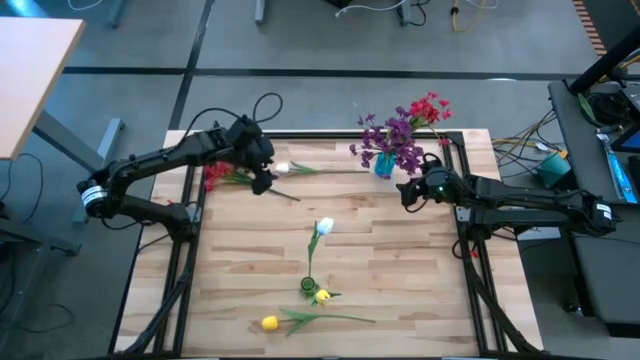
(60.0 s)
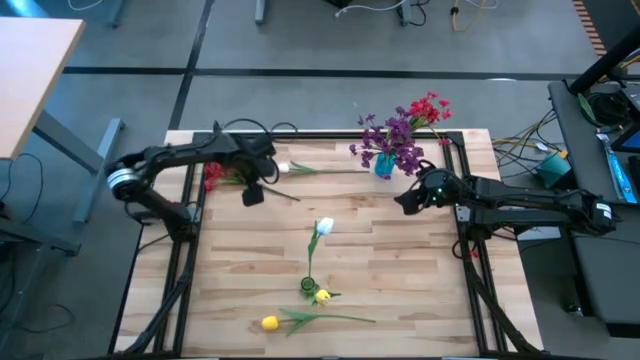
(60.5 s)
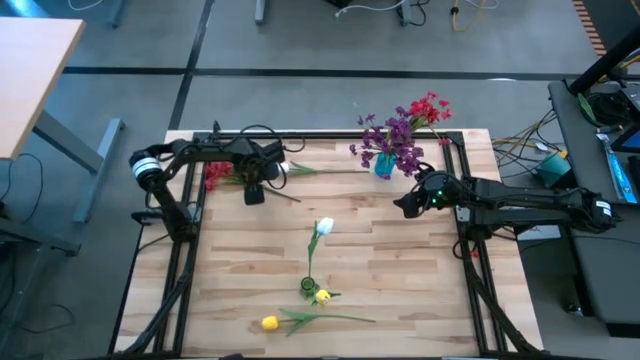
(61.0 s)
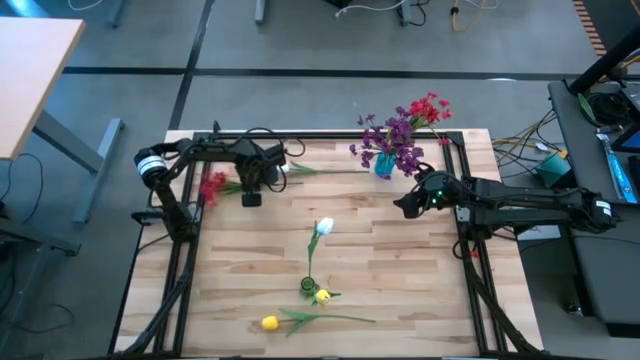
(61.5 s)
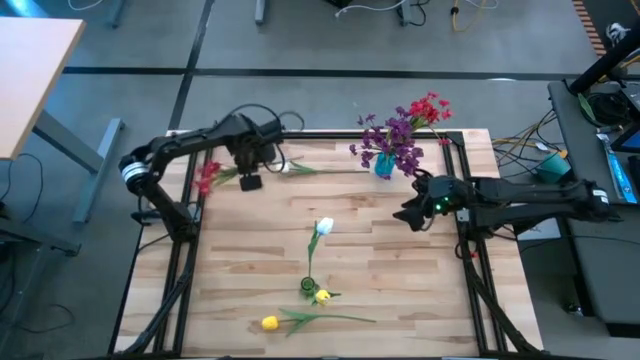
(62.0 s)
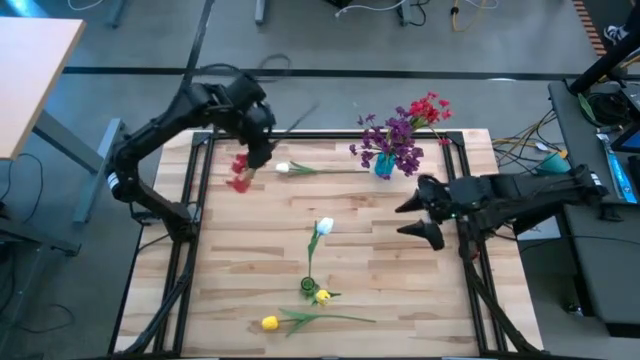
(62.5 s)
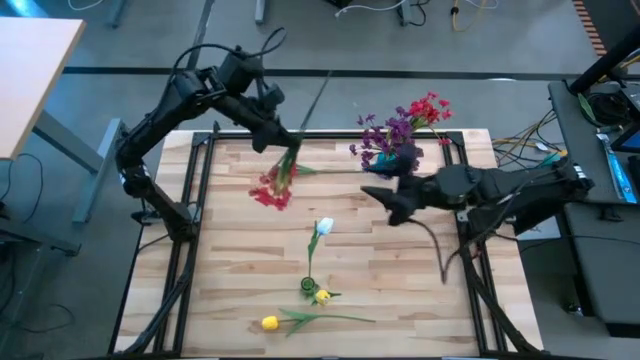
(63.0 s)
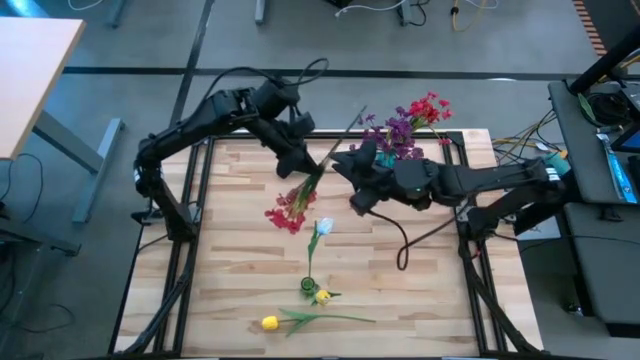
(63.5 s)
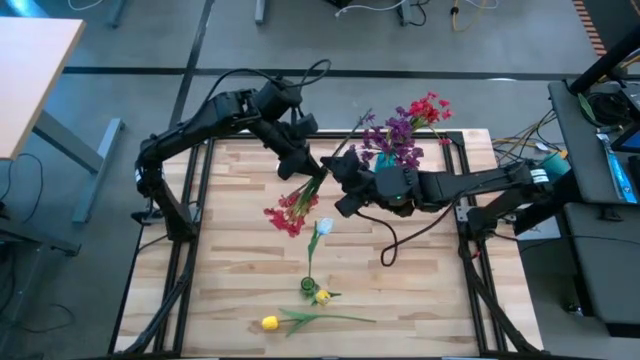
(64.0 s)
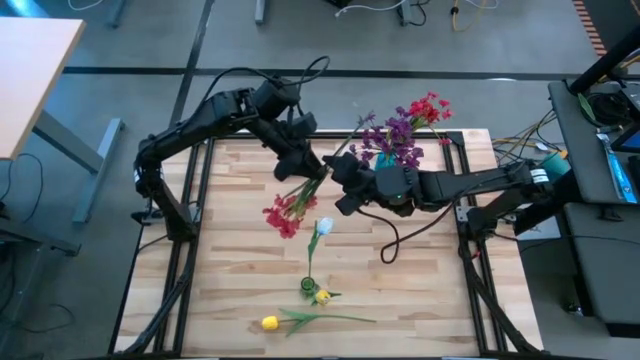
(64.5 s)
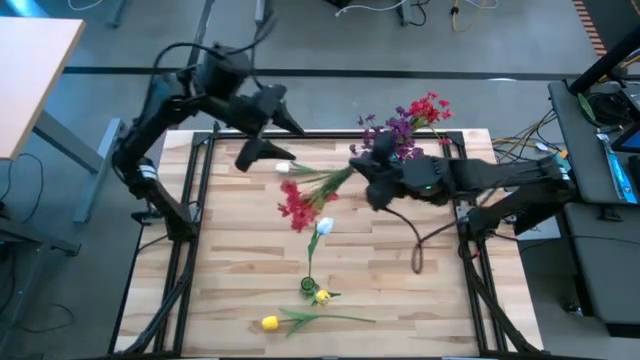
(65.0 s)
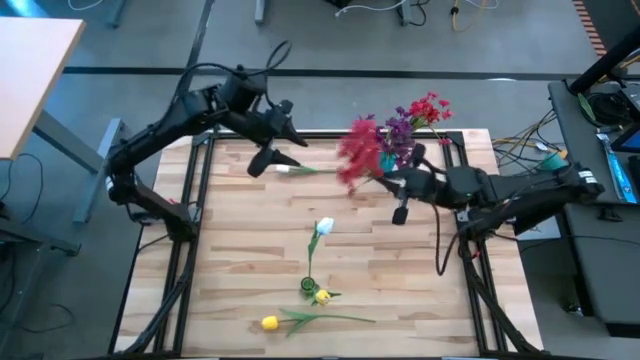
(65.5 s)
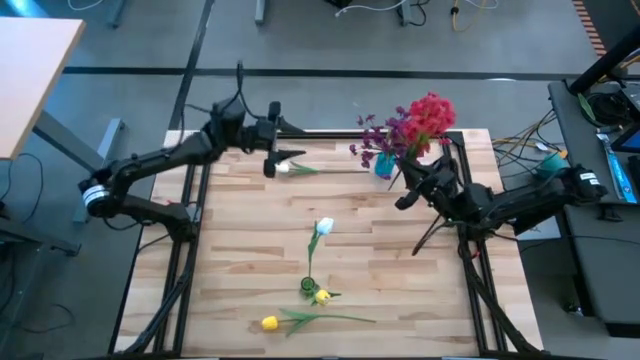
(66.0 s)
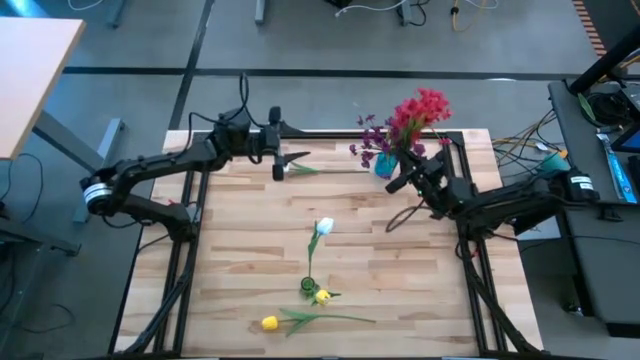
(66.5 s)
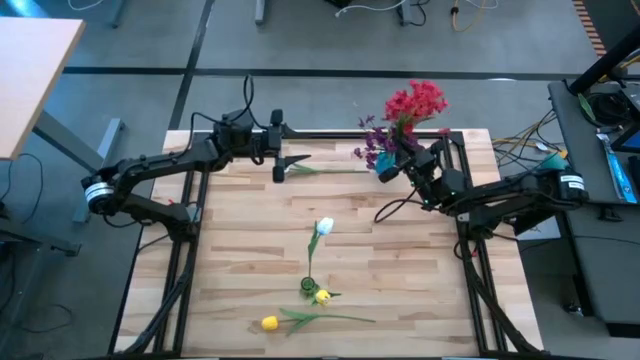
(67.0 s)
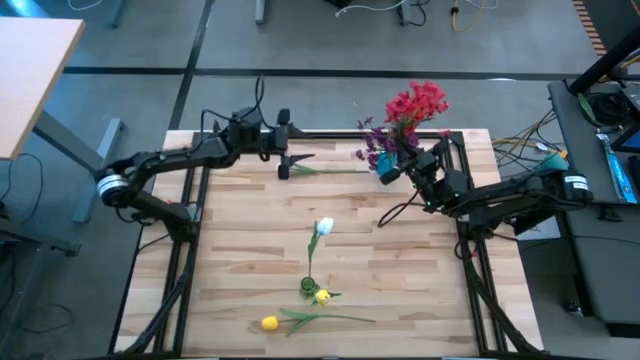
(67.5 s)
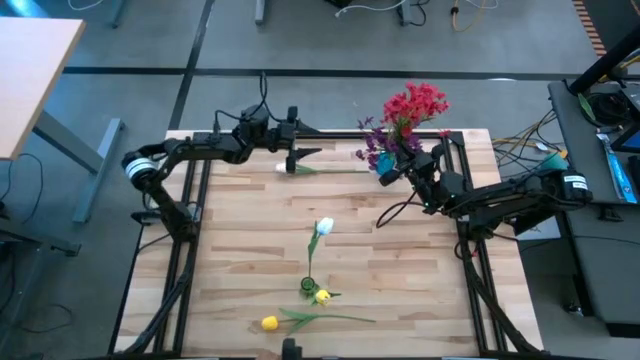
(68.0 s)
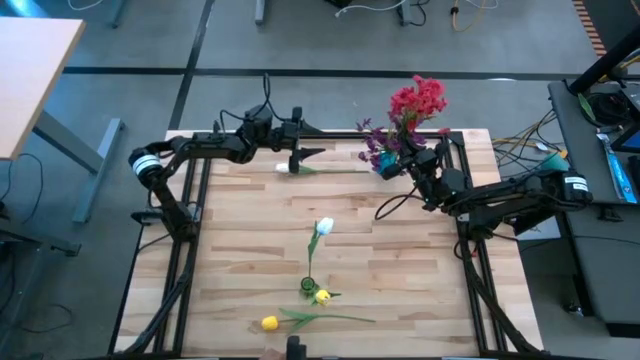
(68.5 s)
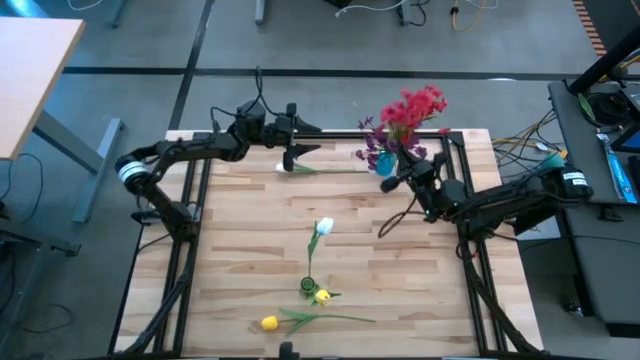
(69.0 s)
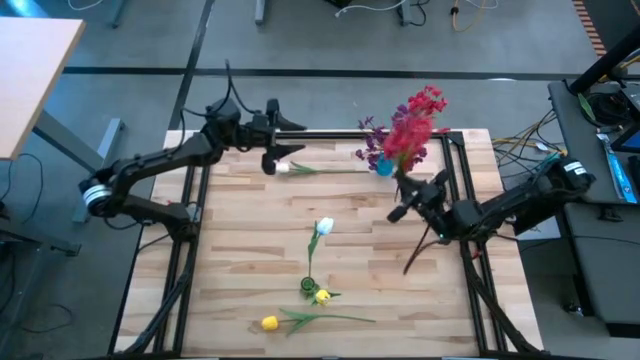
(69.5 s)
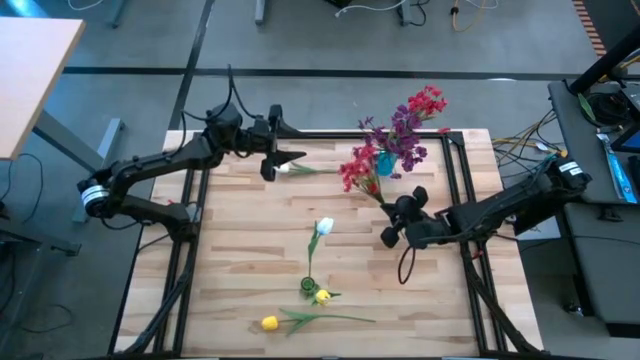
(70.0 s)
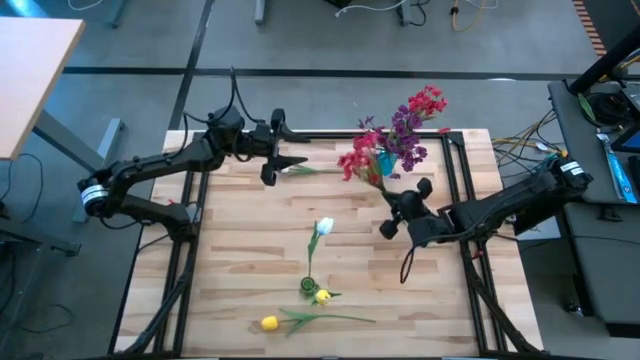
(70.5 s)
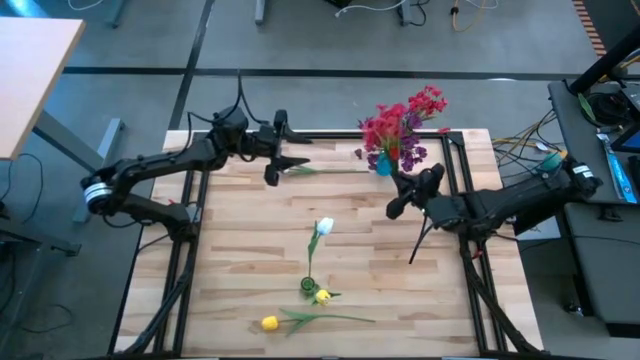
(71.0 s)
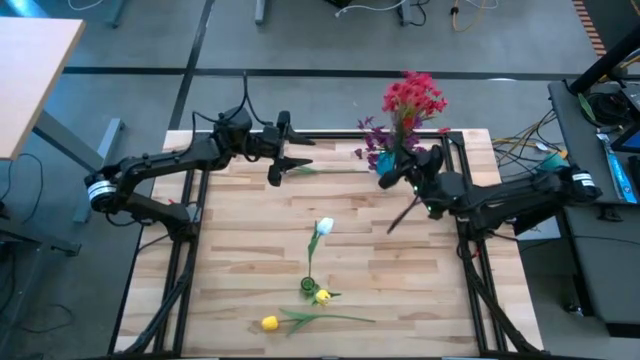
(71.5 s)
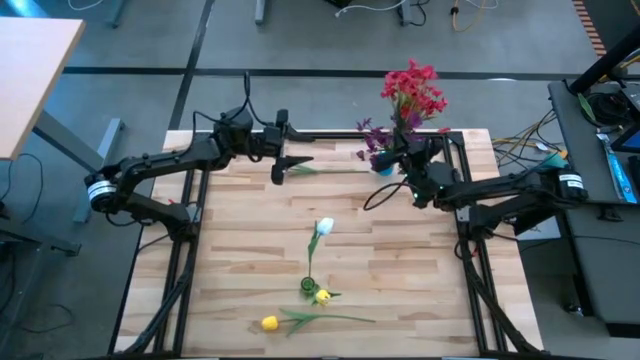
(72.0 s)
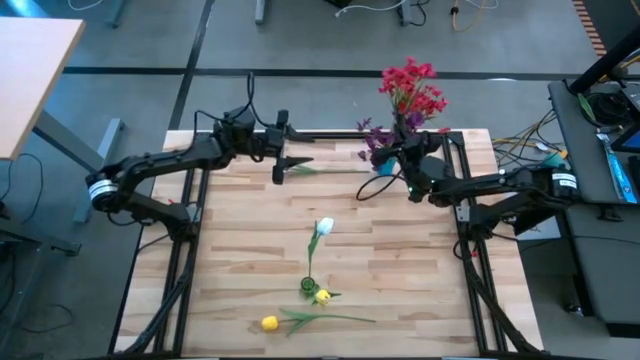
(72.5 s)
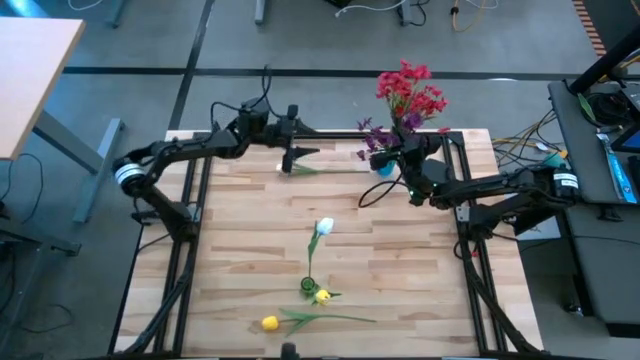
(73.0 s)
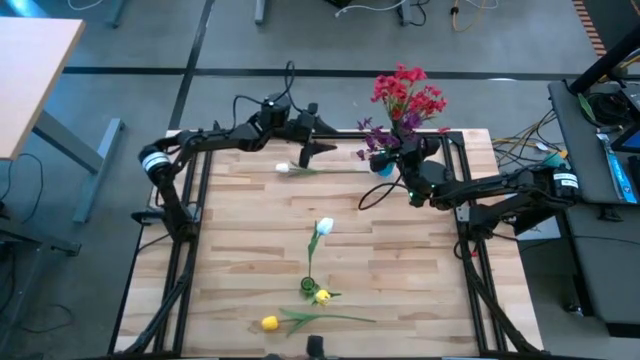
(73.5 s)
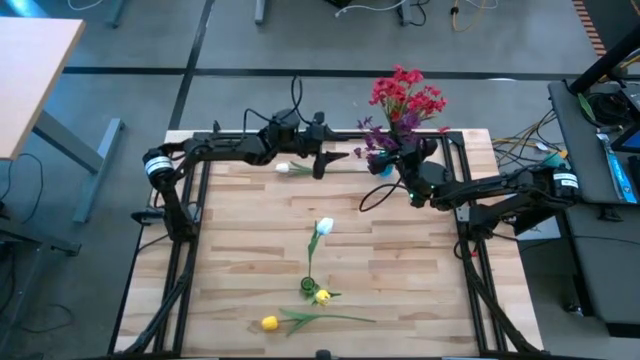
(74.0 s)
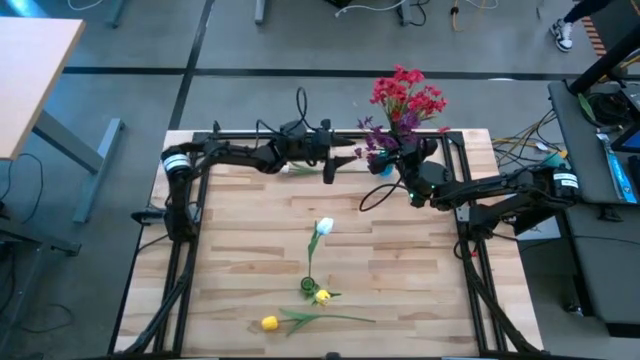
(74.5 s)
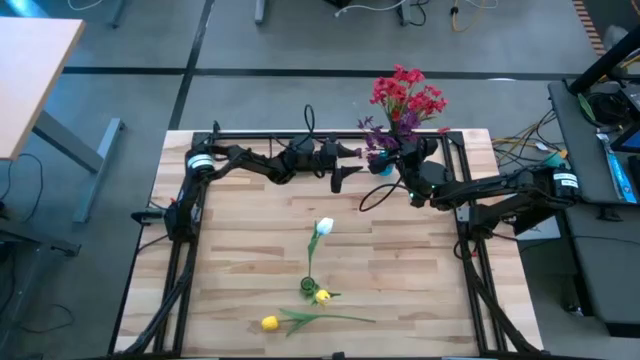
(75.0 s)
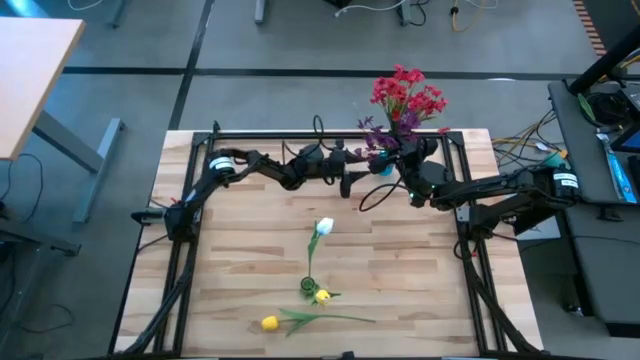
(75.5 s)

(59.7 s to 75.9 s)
Task: Sort flowers into vase by color
Put the red flowers into the blue vase

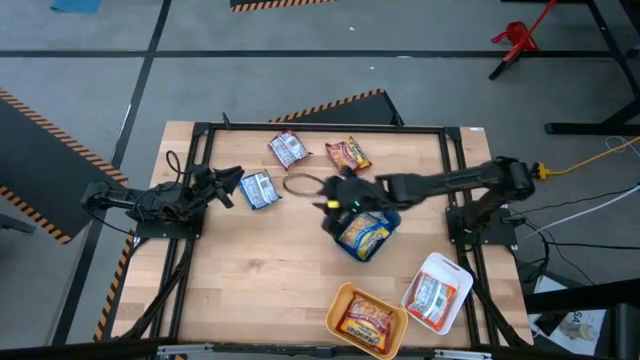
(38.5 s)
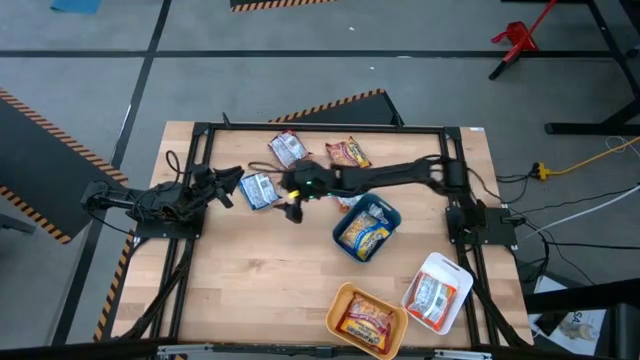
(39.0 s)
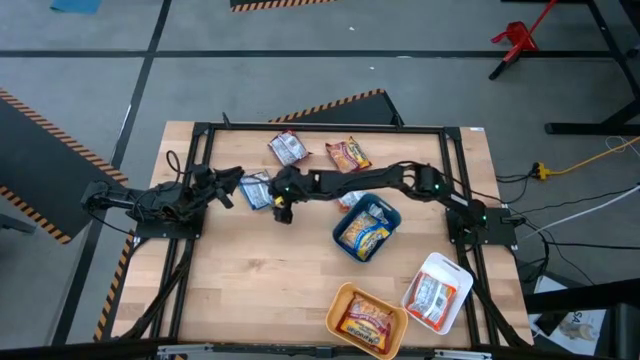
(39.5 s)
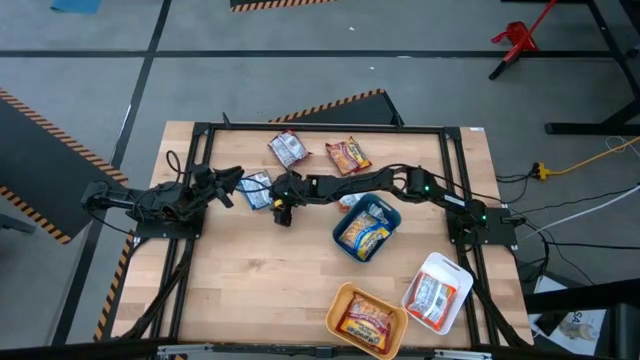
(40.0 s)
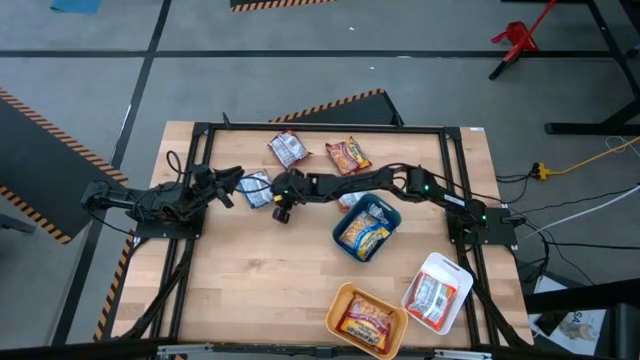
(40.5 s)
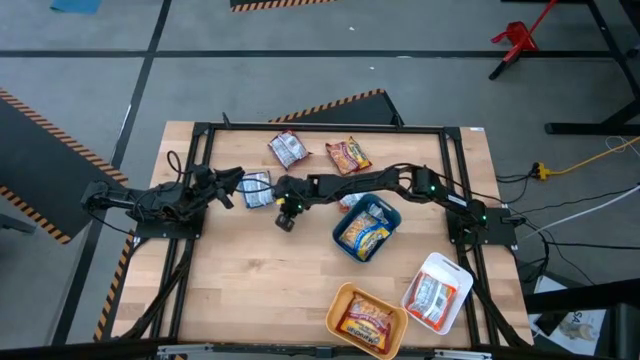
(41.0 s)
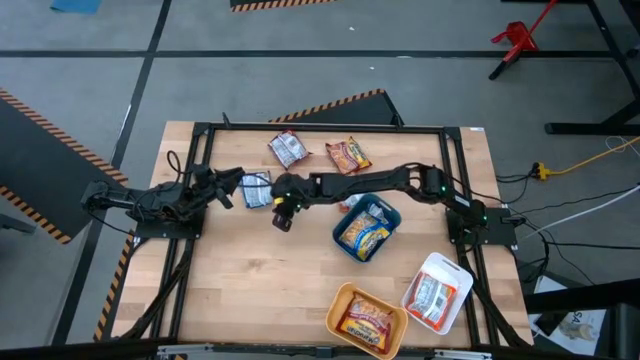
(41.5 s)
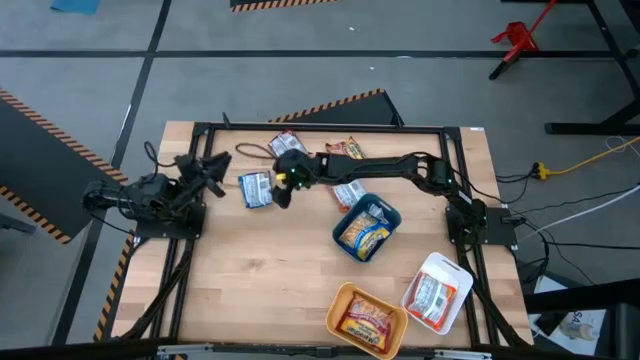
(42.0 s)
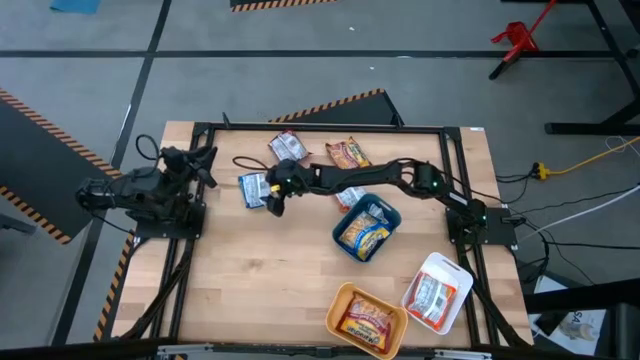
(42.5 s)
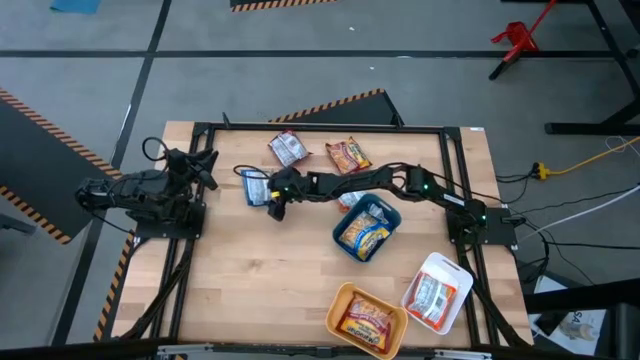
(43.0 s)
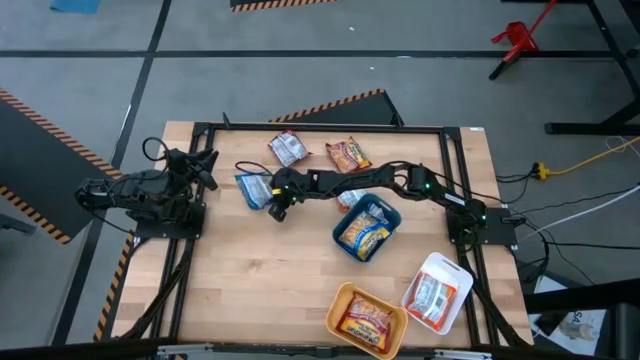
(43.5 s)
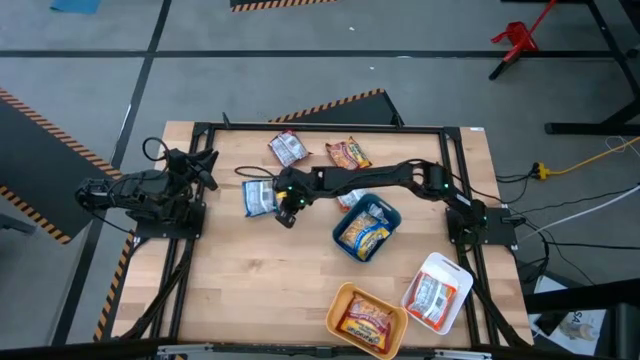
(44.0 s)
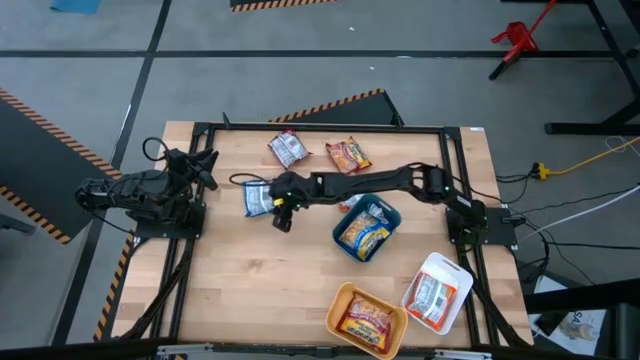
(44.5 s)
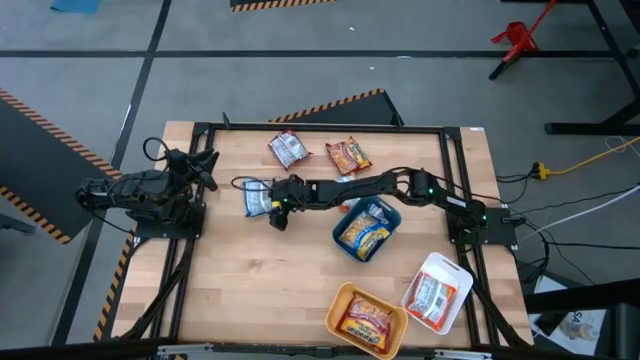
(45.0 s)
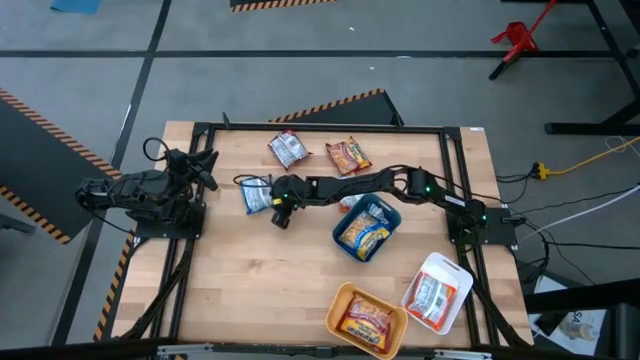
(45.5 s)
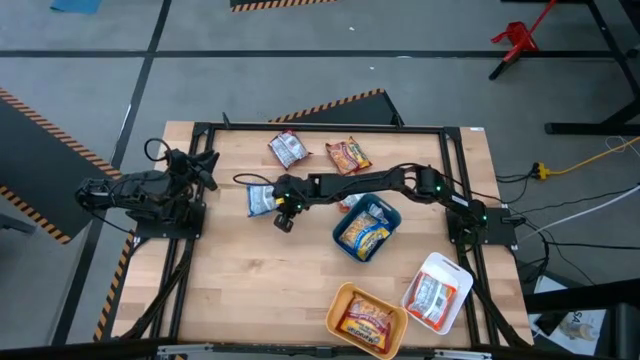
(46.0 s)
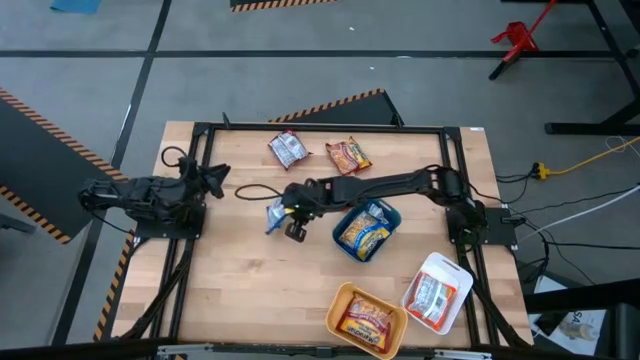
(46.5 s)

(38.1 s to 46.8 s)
Task: Sort Maruchan noodles
Put the blue noodle pack into the green bin
